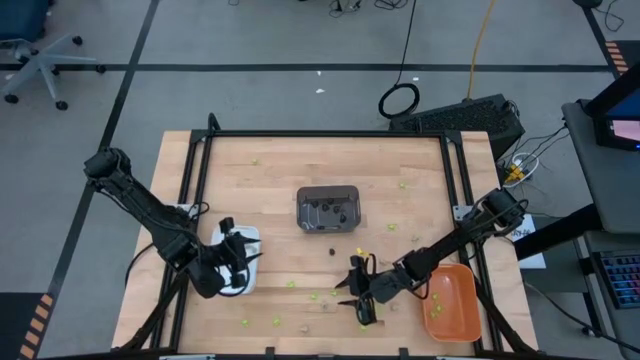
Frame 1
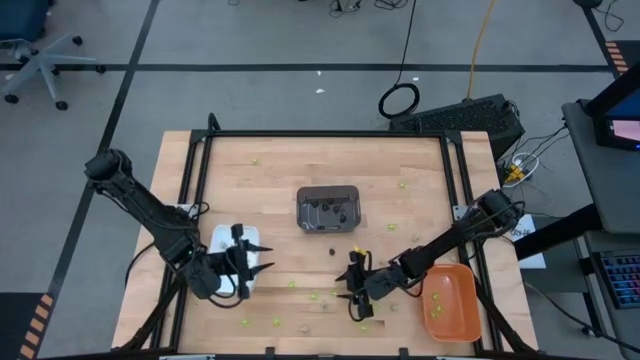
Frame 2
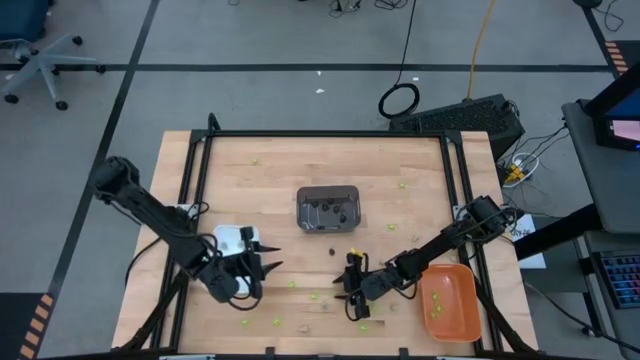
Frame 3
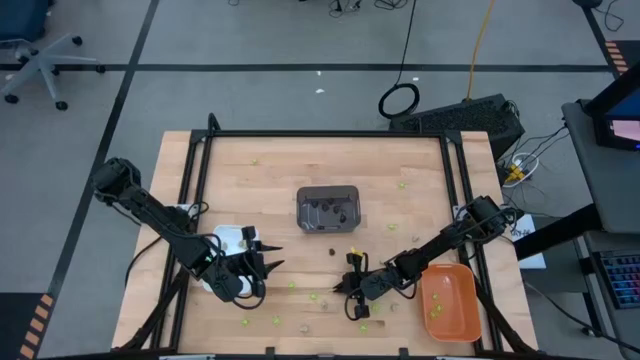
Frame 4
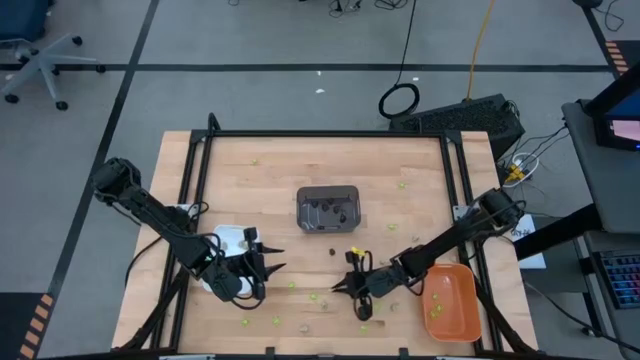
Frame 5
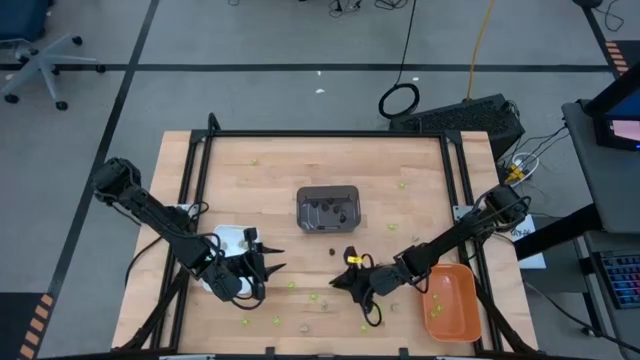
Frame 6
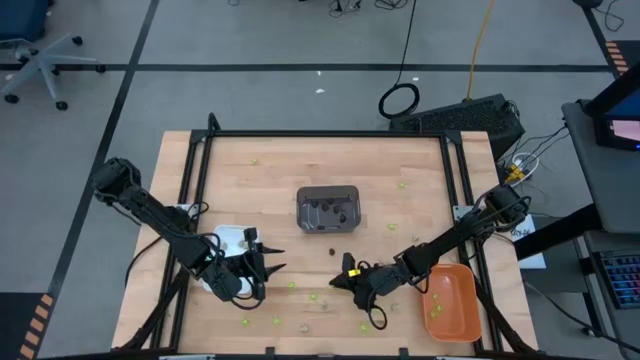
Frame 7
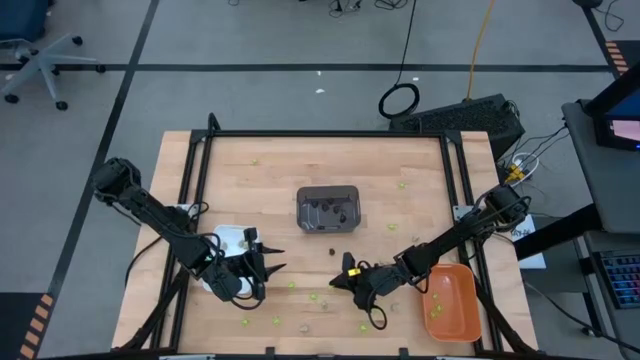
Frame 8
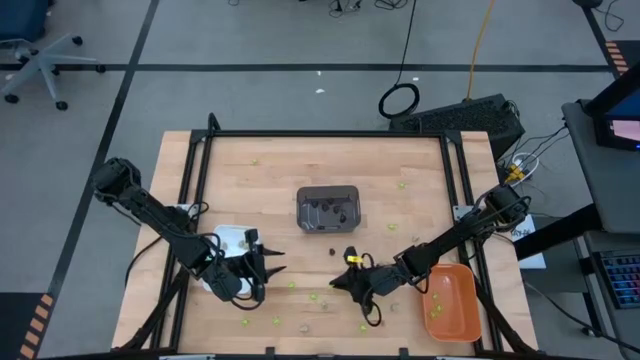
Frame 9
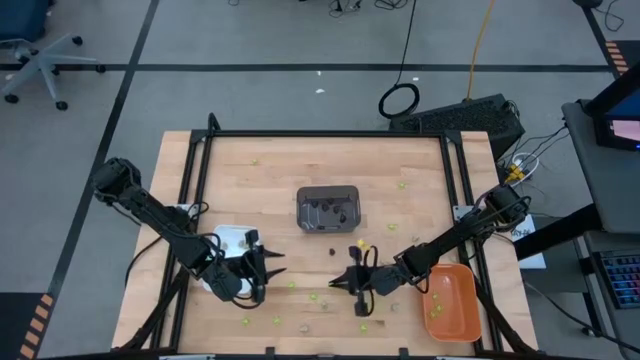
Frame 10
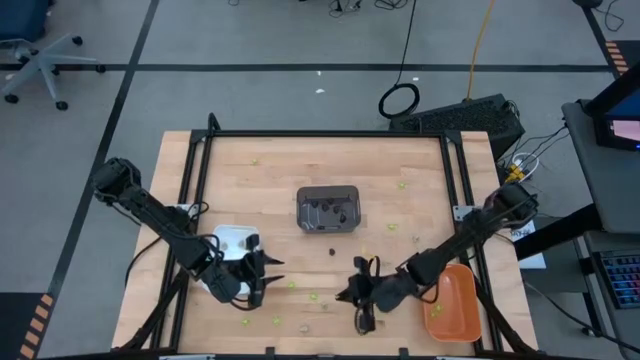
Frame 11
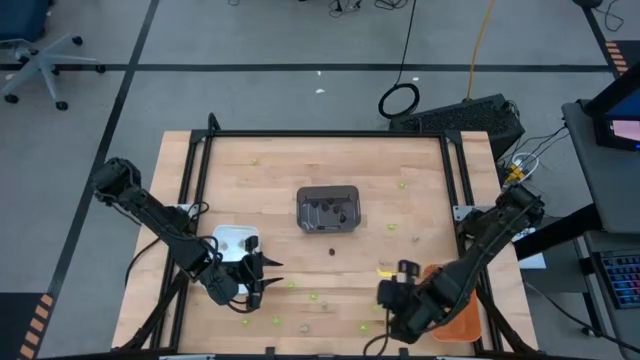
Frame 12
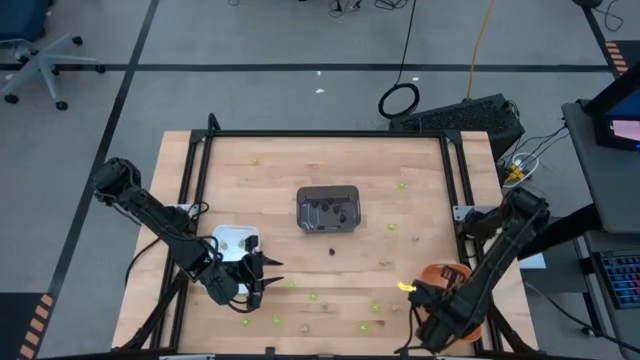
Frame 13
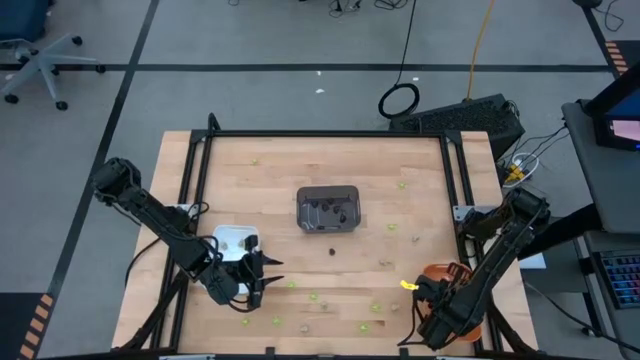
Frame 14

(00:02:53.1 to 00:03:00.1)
Task: Sort Halloween decoration
Put the green spider toy into the orange bin

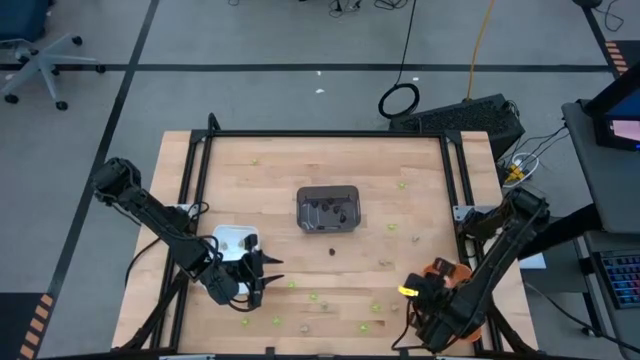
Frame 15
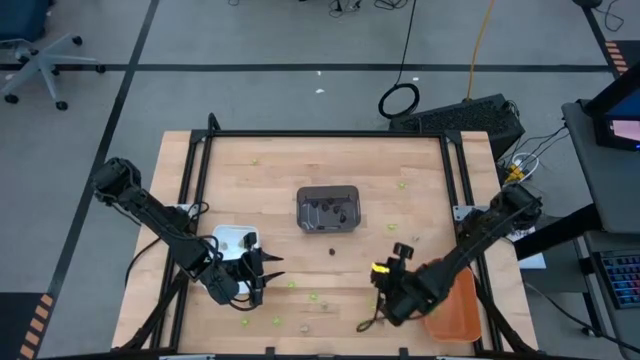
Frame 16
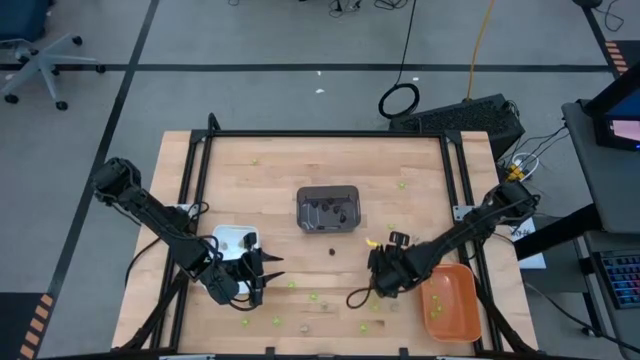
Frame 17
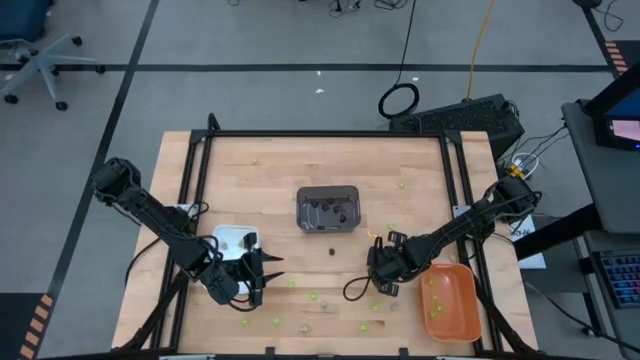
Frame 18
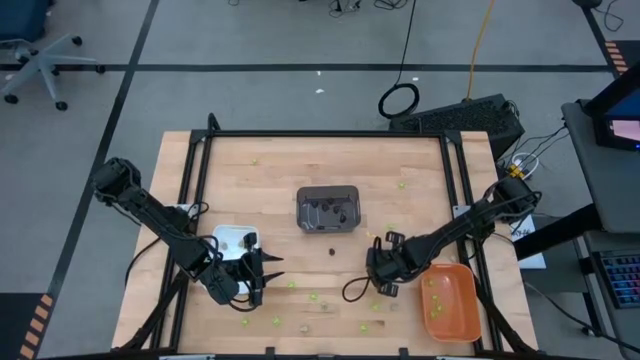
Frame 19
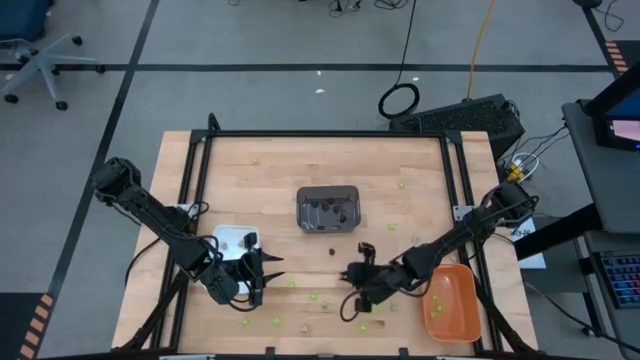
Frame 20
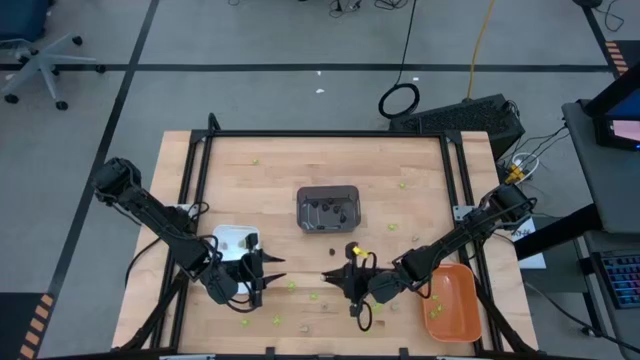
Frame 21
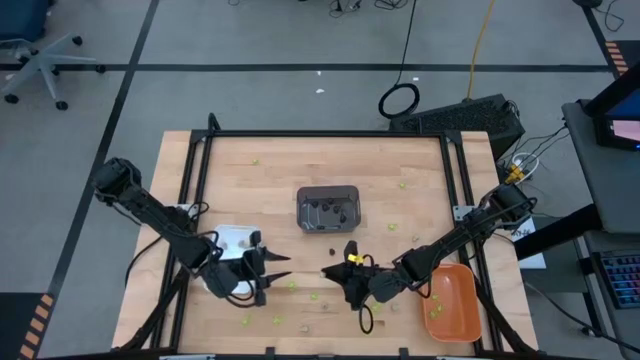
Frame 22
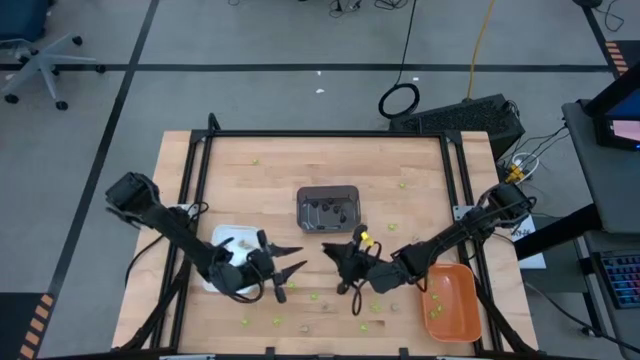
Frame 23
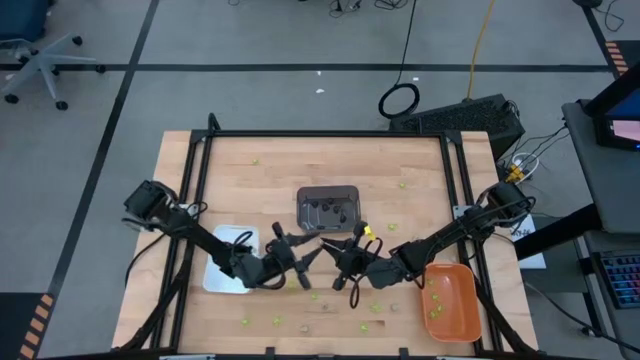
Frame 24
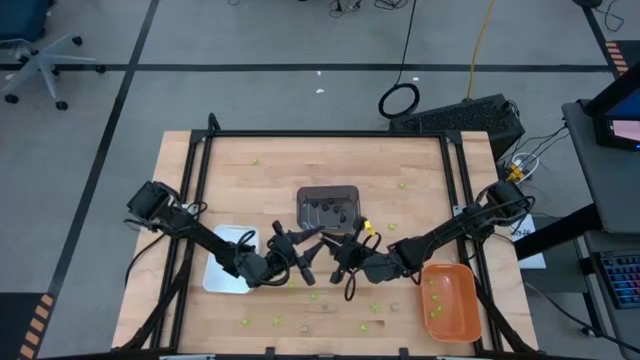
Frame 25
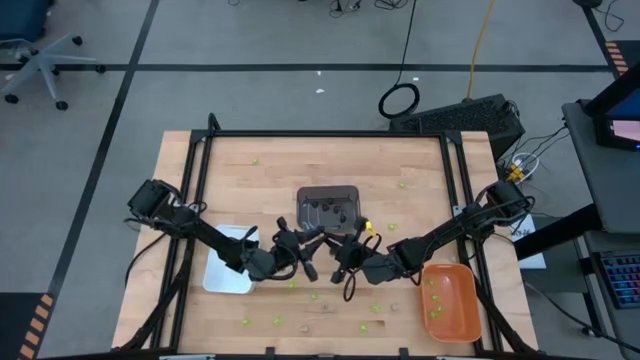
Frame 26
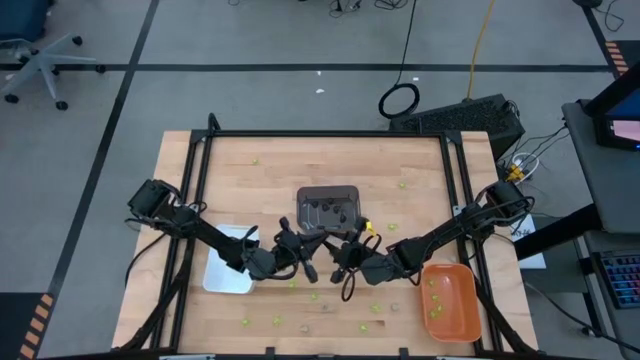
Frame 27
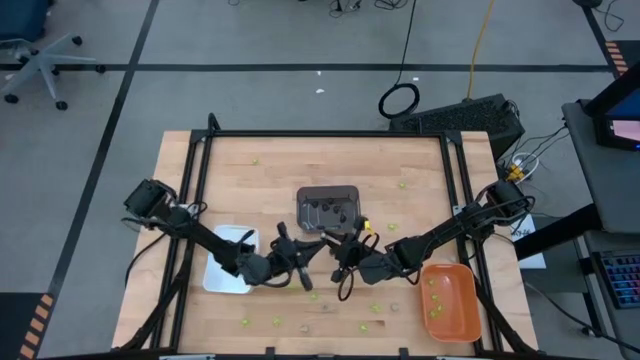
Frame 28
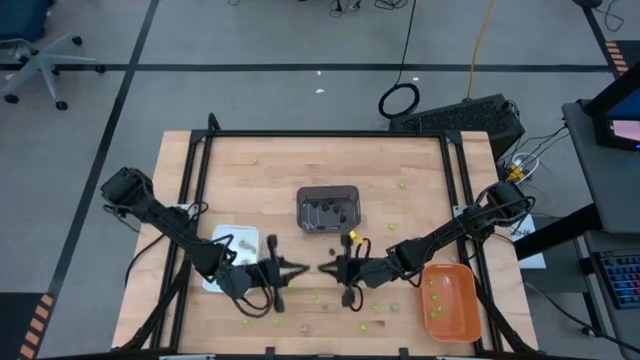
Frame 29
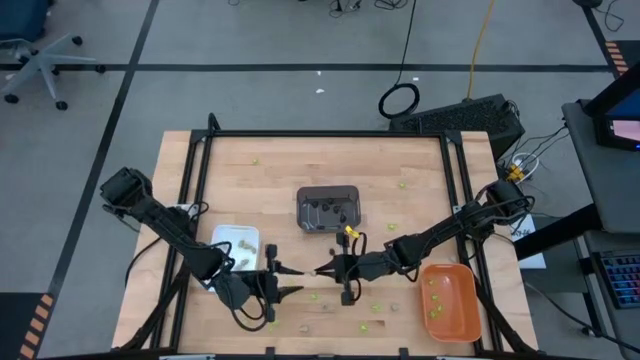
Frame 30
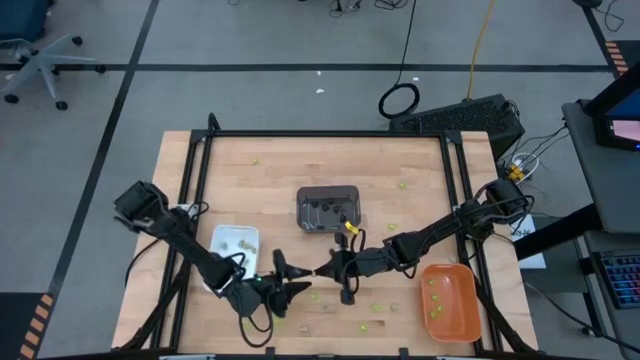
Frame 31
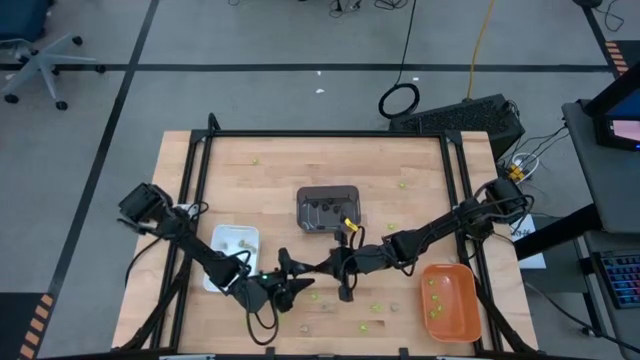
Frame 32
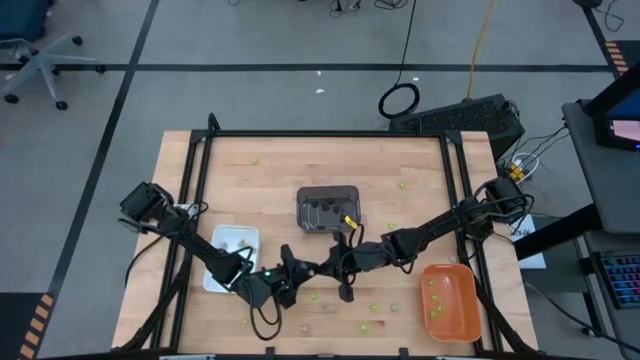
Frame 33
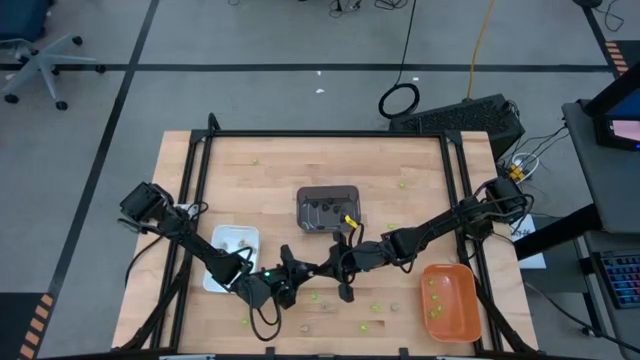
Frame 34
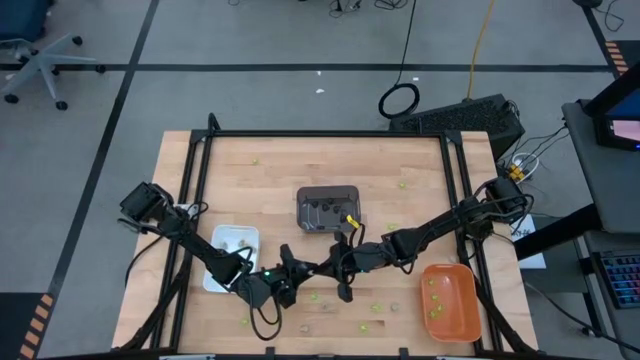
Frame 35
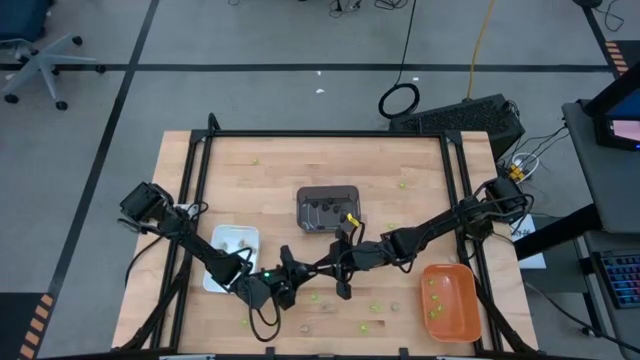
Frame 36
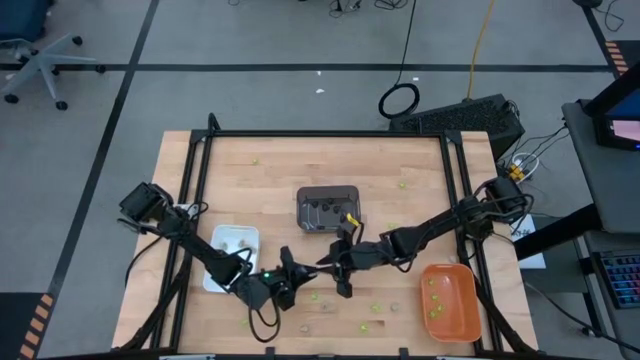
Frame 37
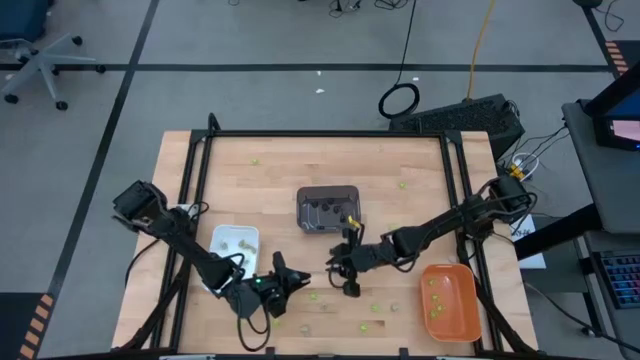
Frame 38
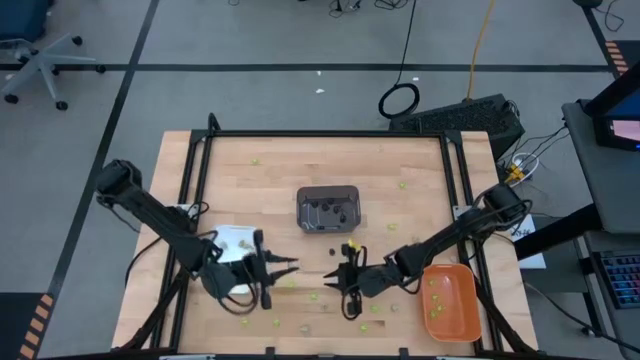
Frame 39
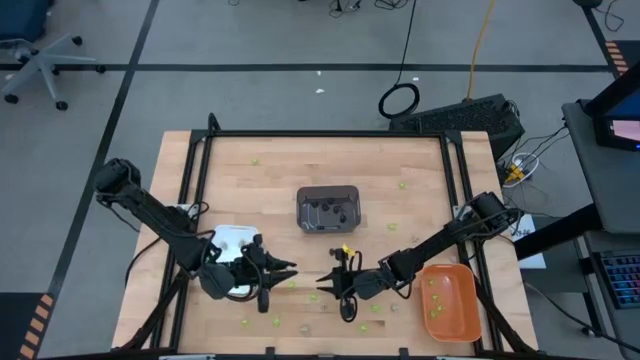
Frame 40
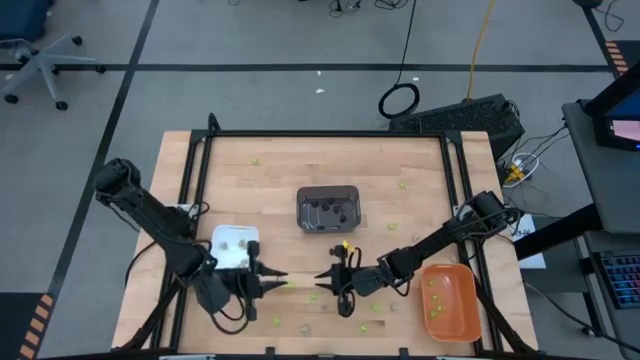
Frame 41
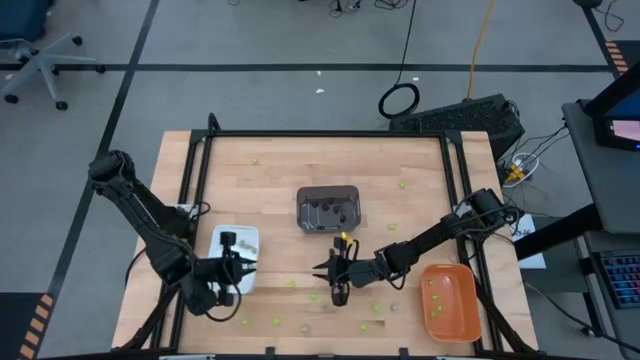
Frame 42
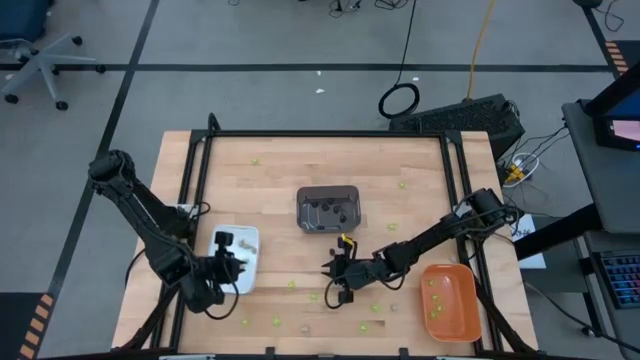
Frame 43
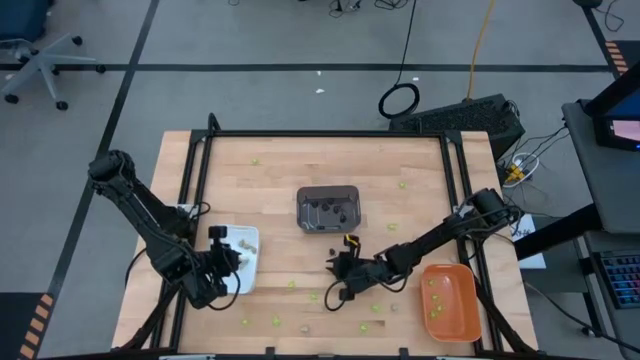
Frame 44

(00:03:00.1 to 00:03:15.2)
Put the white skull toy into the white bin
